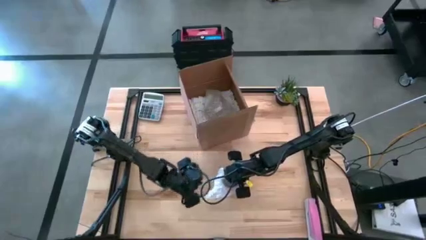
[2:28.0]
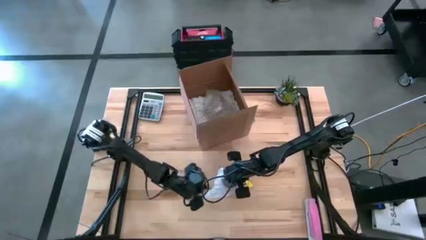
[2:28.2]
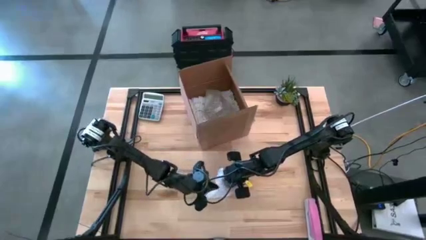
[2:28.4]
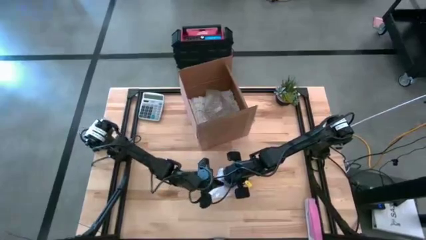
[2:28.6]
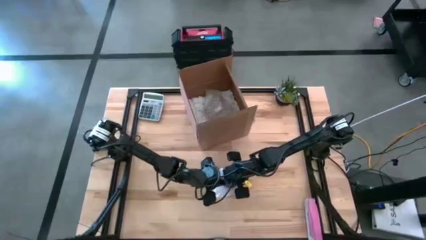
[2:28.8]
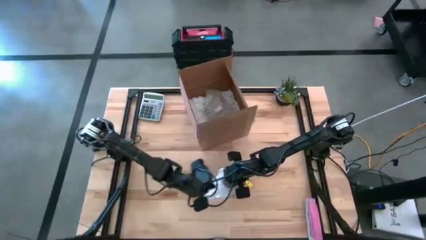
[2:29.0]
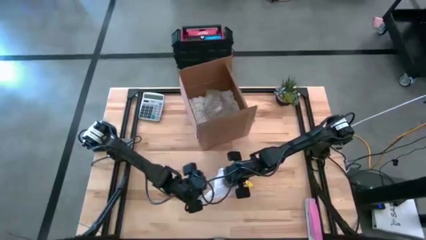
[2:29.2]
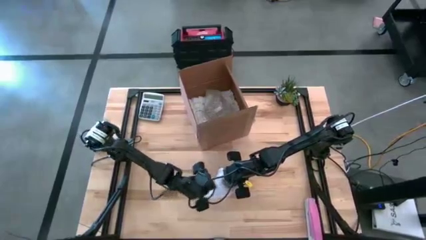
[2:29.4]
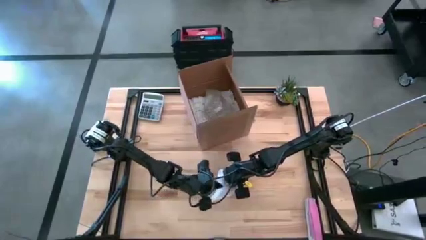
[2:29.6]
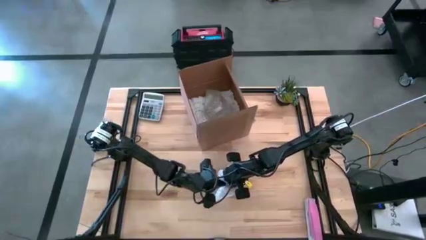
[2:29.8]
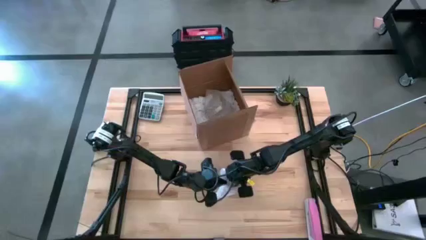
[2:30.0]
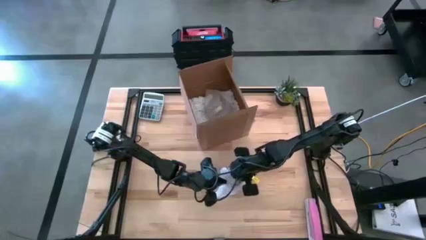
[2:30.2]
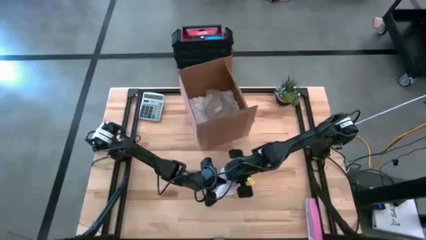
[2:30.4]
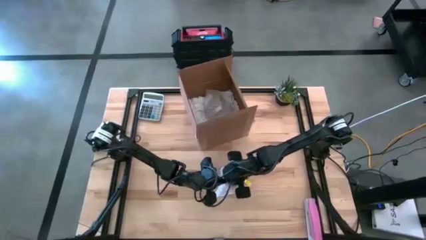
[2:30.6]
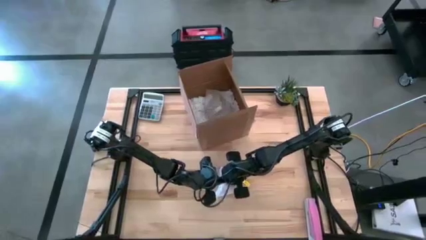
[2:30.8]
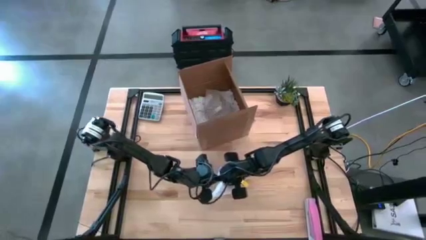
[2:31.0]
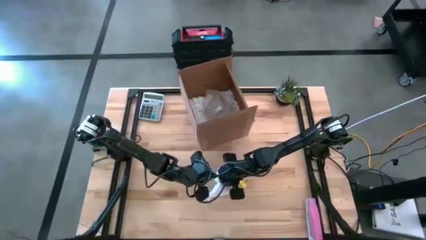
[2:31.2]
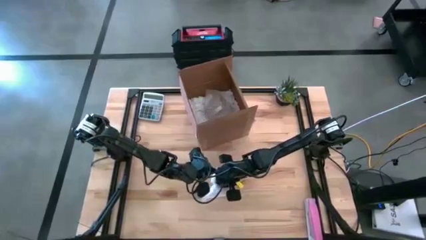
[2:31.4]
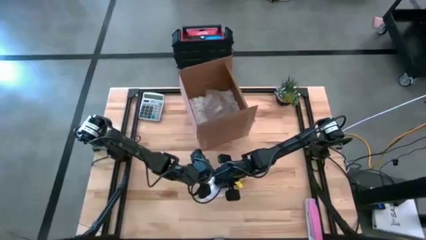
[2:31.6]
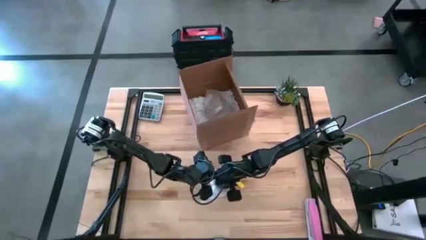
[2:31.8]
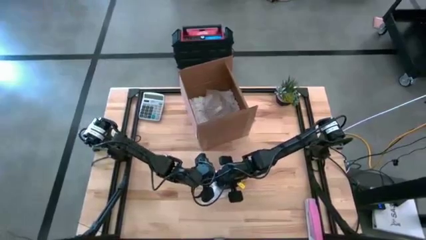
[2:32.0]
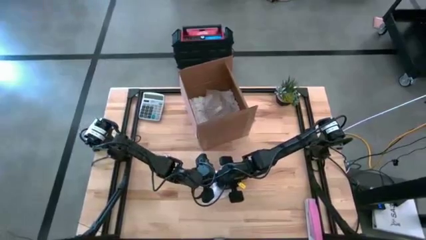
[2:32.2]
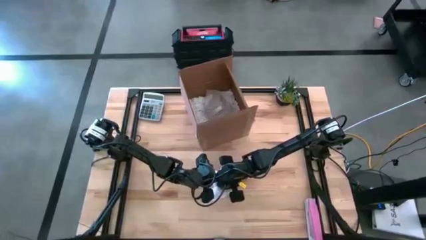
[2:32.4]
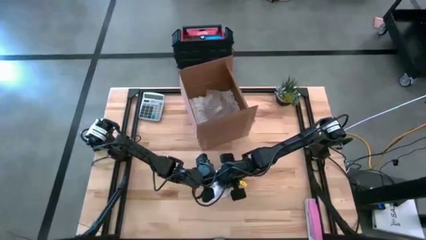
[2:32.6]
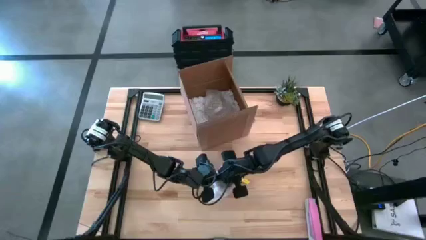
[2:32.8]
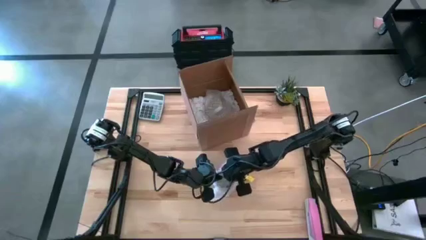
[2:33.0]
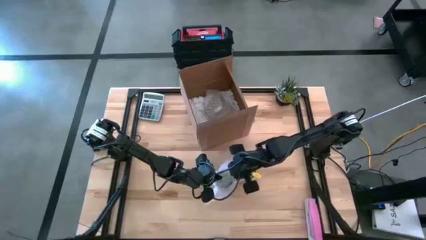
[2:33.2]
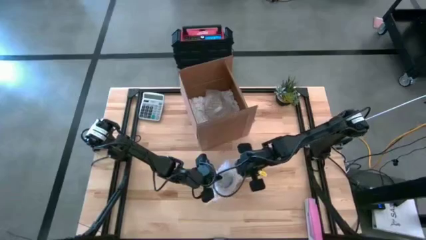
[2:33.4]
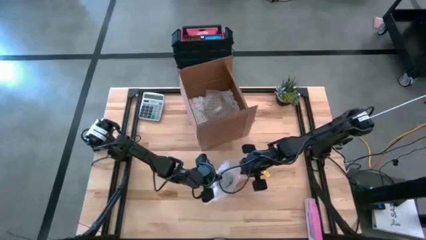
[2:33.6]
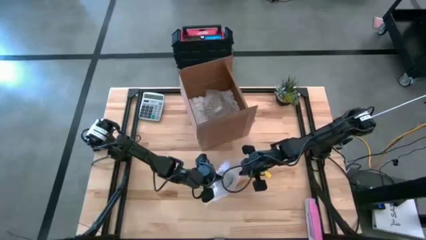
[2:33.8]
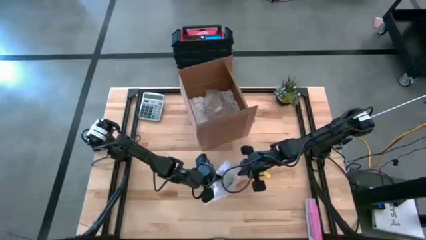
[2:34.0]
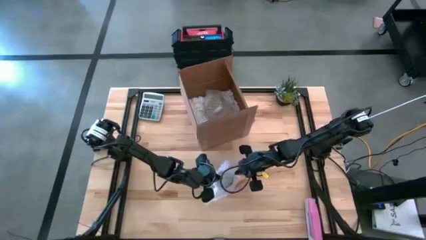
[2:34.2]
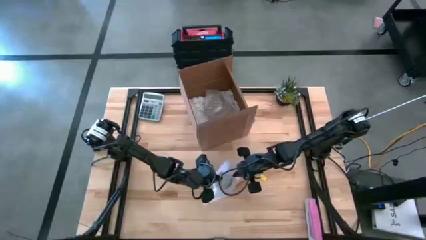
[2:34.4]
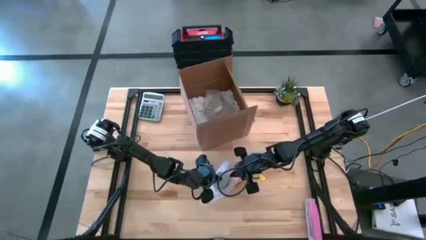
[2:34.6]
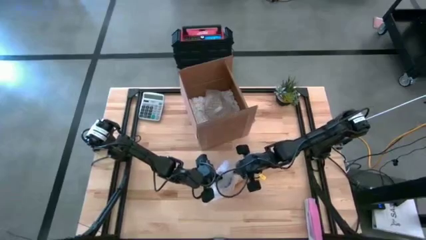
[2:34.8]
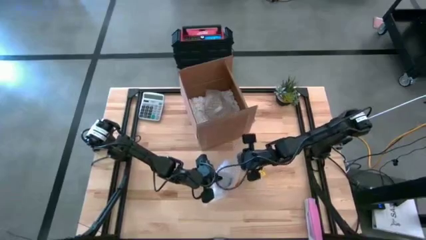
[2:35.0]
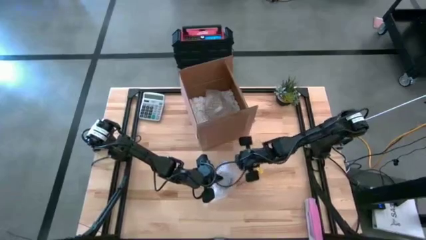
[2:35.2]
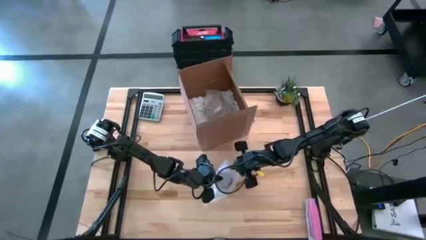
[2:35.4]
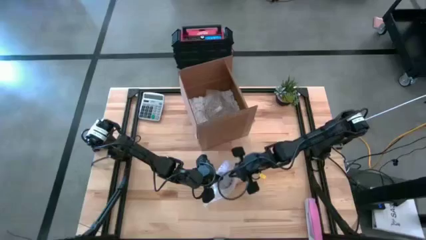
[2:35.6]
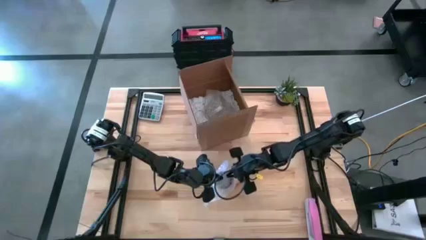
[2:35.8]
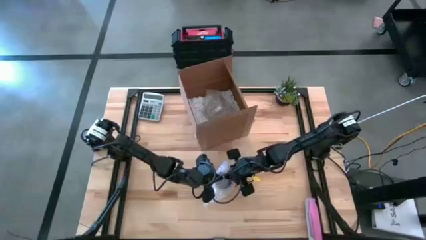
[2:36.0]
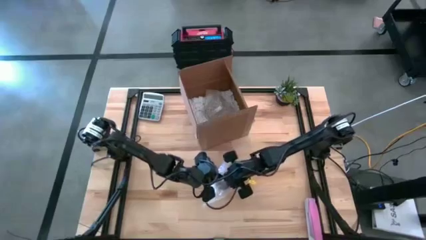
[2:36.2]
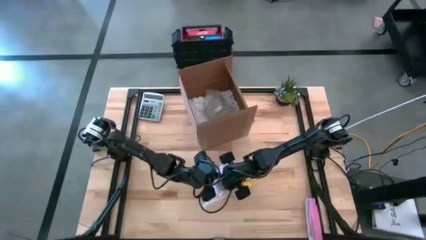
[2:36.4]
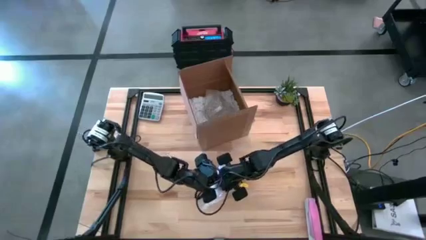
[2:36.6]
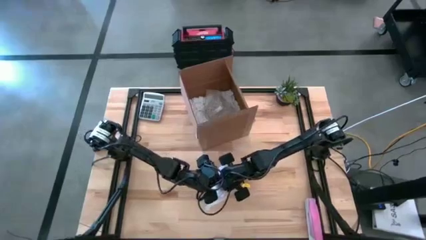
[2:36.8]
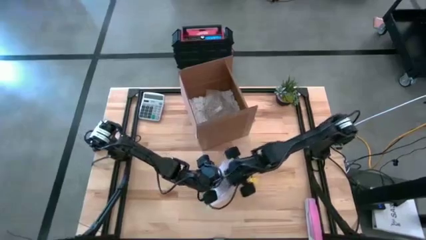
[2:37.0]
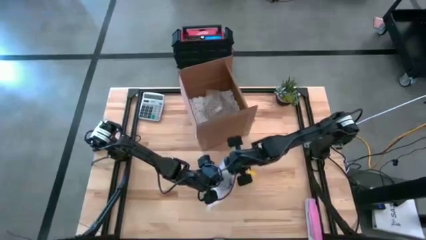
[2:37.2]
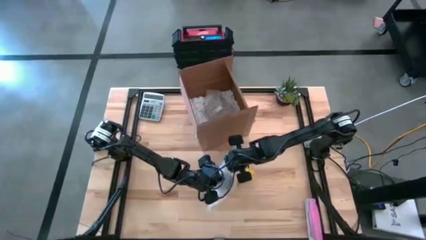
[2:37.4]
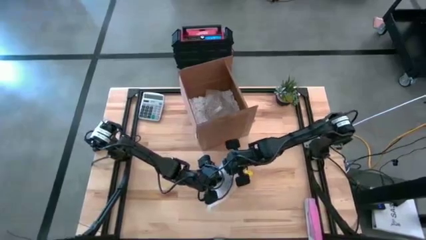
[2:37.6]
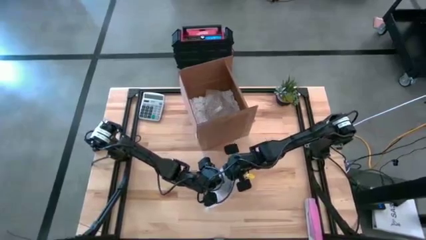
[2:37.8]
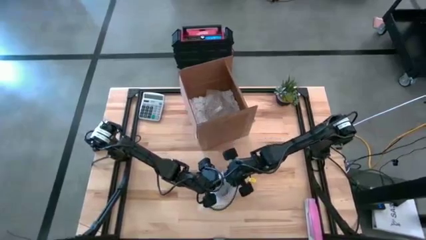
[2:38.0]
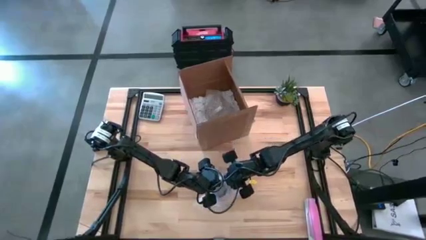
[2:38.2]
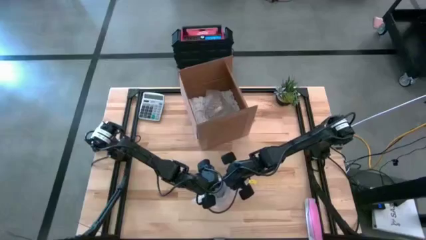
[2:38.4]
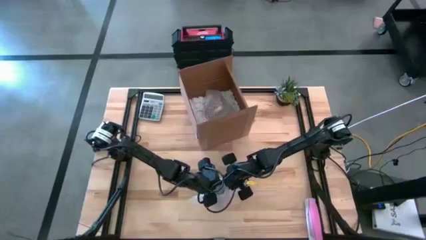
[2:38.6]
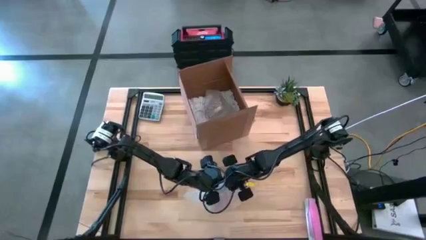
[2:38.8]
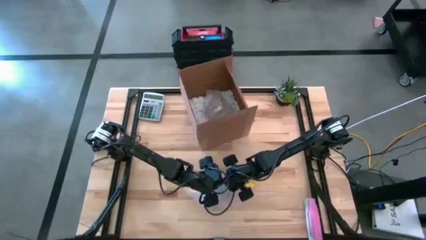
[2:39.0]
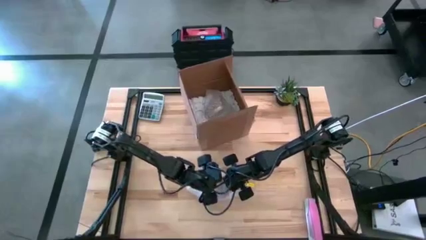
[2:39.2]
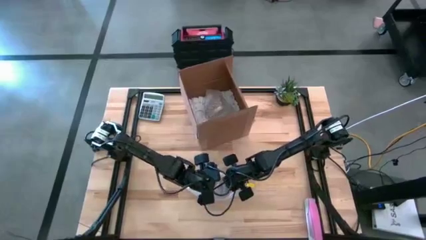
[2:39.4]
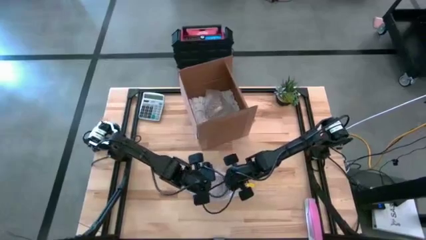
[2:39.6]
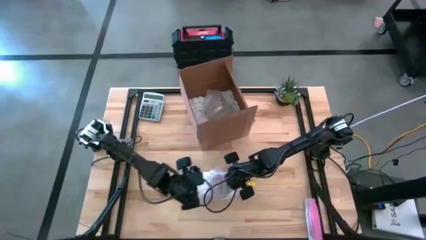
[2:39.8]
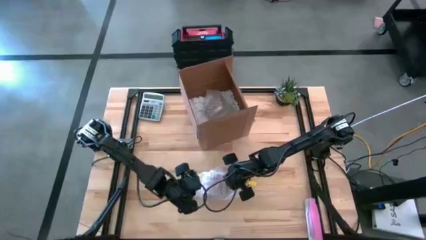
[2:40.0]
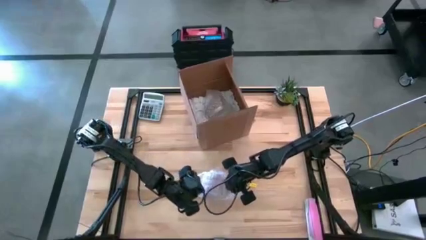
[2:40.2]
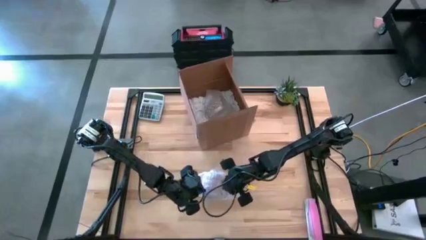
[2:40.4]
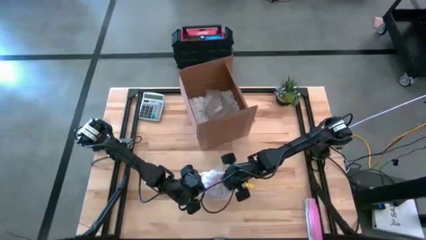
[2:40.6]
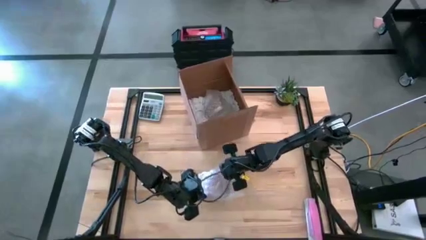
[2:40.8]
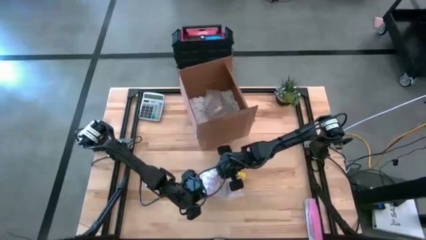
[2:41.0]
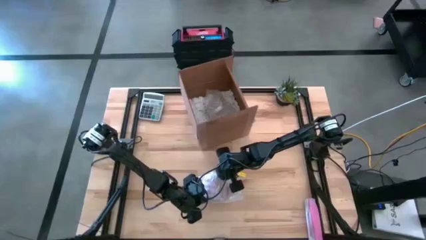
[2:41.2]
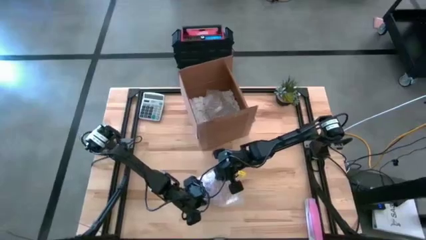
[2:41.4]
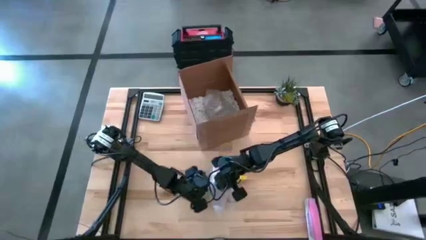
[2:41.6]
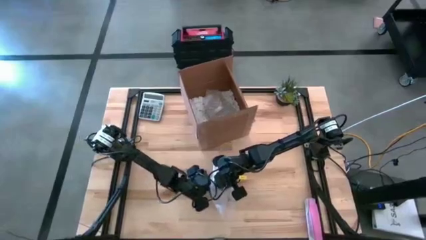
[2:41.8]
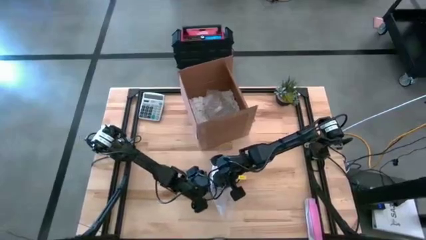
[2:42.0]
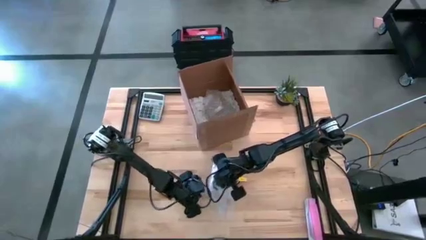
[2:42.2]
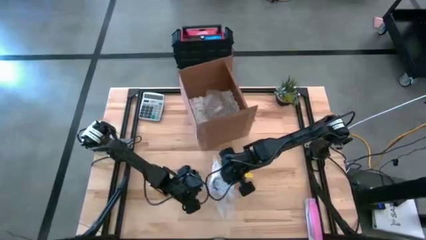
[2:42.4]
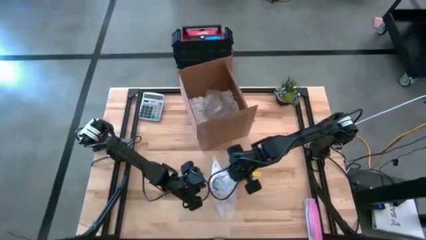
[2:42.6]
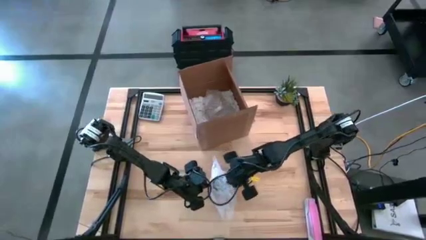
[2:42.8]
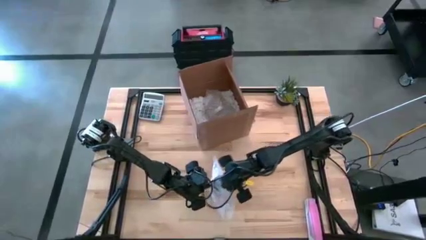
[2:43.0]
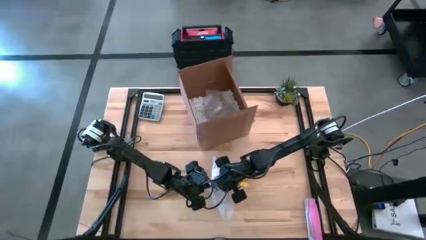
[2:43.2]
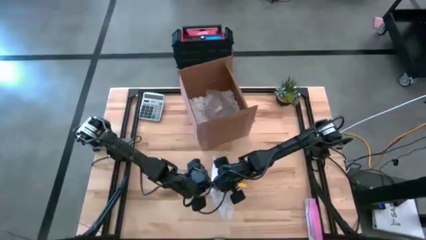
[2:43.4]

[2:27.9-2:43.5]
Task: wrap mug
Wrap the purple mug with the bubble wrap
